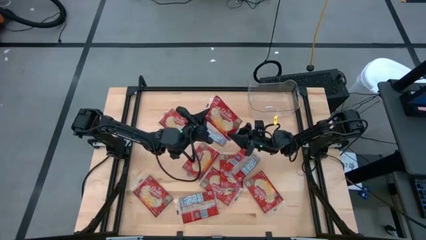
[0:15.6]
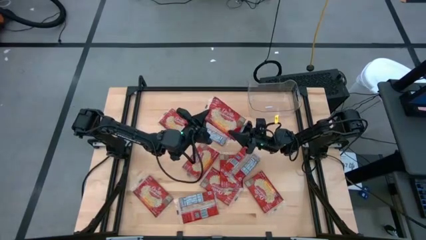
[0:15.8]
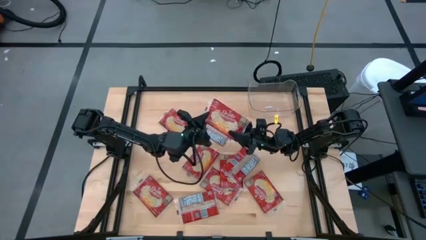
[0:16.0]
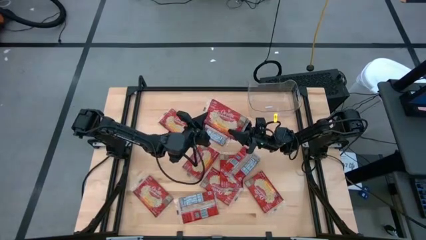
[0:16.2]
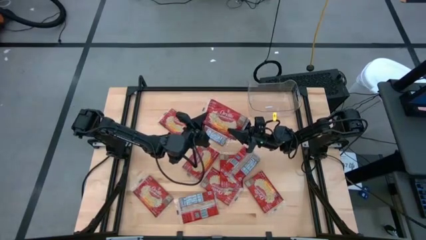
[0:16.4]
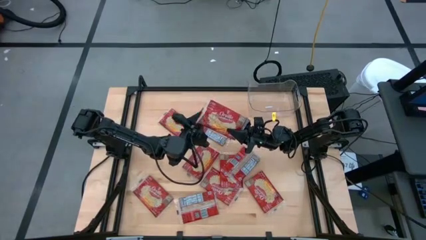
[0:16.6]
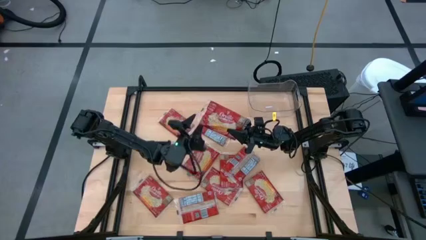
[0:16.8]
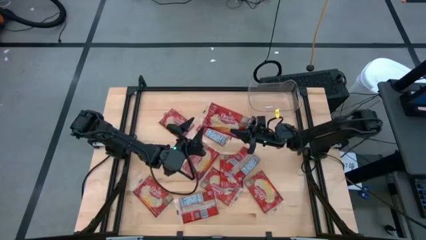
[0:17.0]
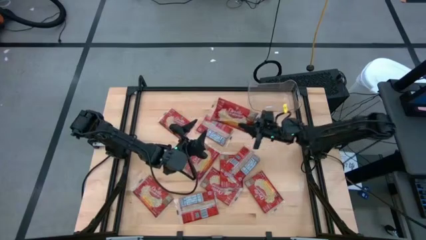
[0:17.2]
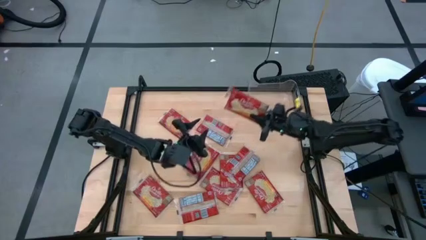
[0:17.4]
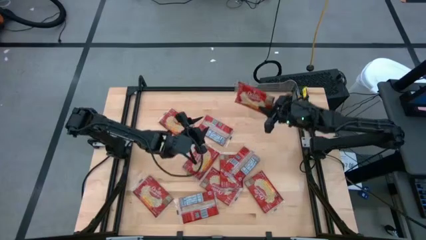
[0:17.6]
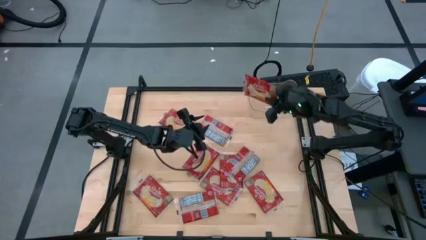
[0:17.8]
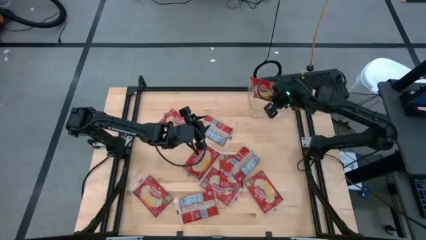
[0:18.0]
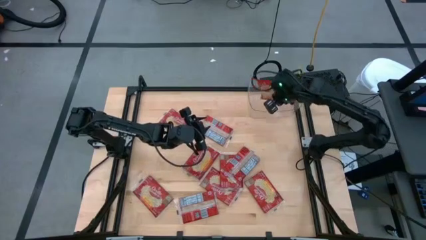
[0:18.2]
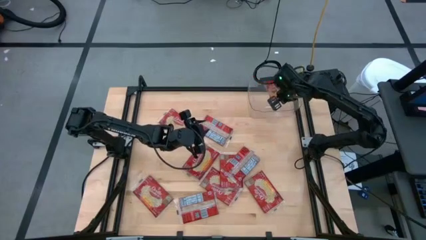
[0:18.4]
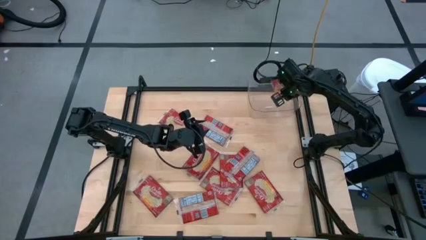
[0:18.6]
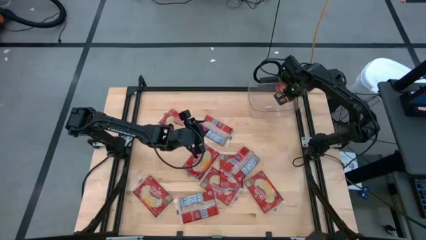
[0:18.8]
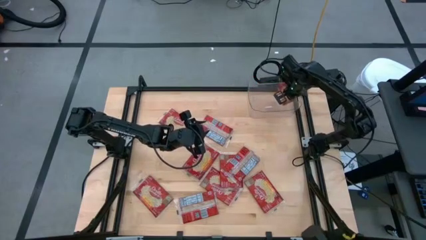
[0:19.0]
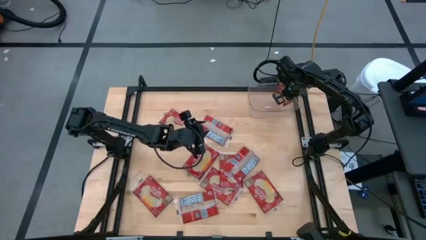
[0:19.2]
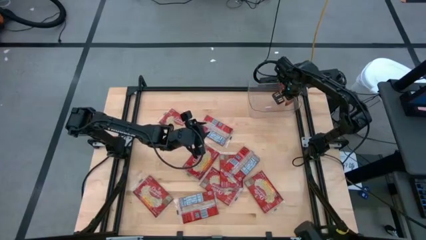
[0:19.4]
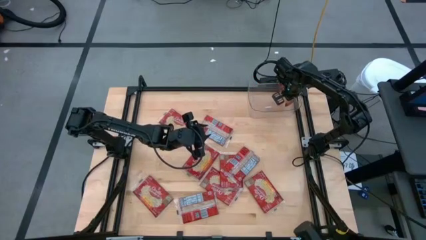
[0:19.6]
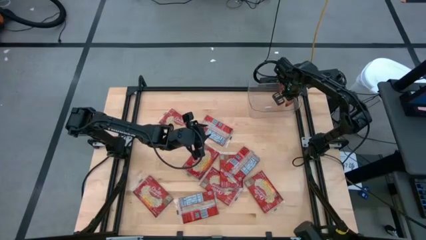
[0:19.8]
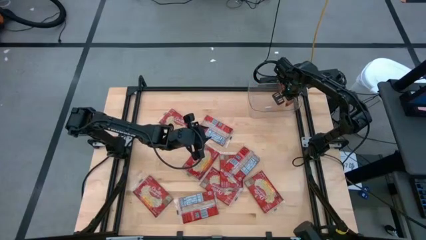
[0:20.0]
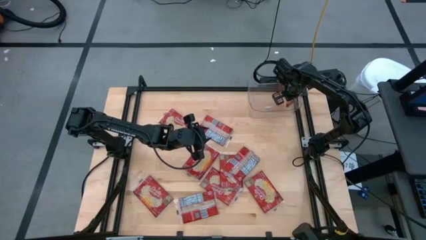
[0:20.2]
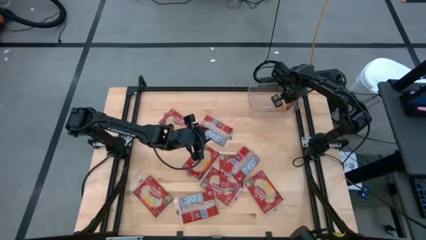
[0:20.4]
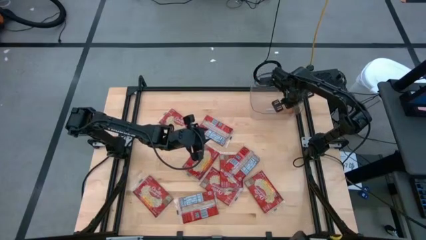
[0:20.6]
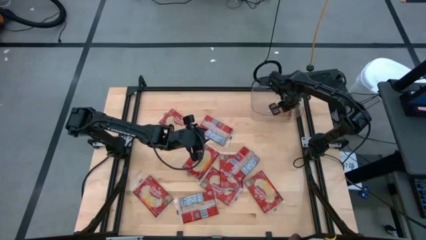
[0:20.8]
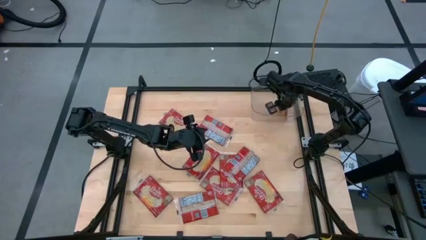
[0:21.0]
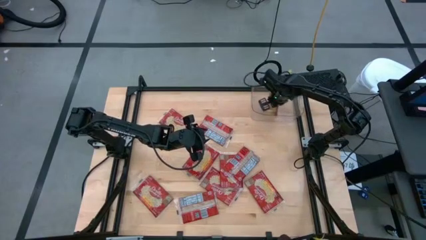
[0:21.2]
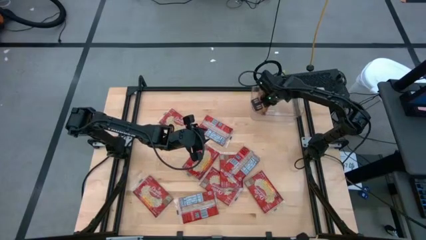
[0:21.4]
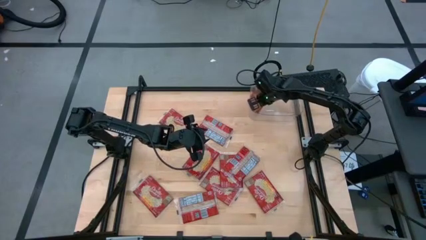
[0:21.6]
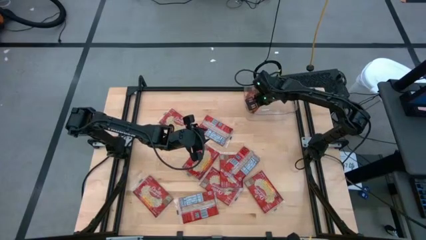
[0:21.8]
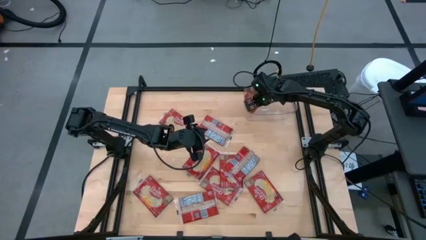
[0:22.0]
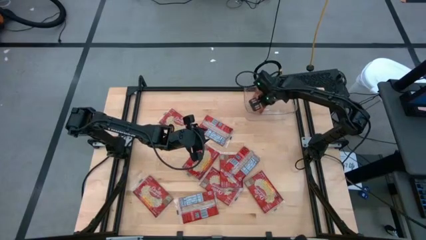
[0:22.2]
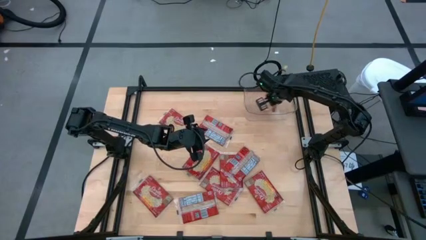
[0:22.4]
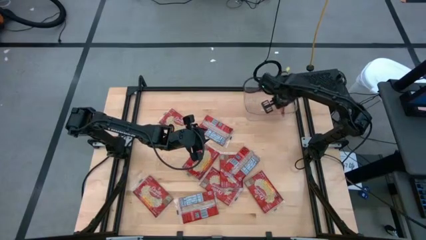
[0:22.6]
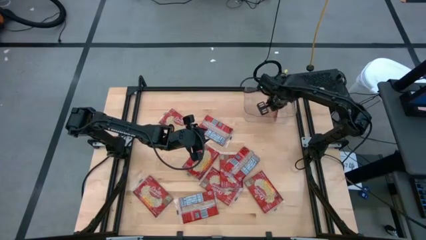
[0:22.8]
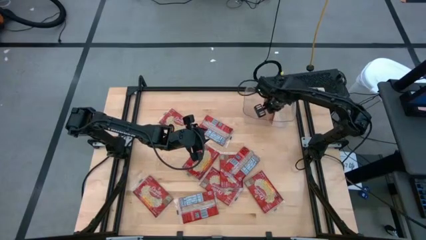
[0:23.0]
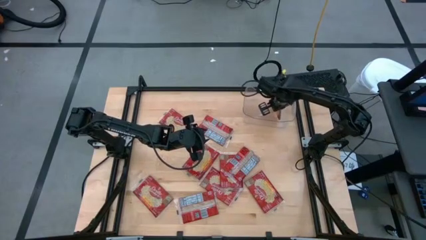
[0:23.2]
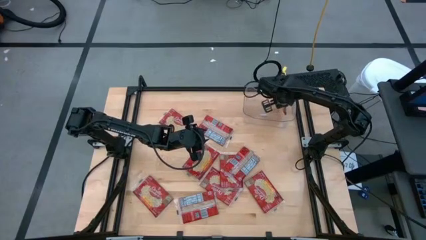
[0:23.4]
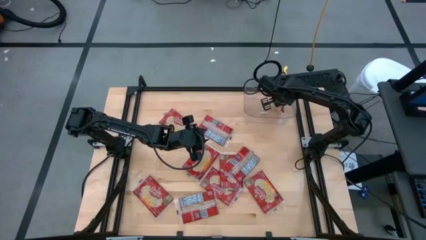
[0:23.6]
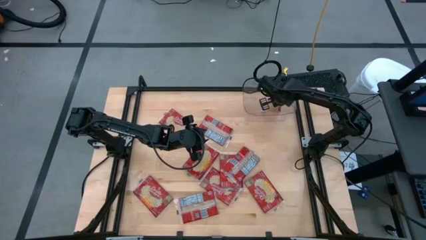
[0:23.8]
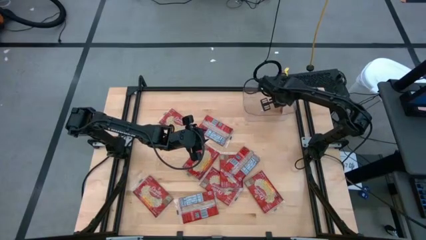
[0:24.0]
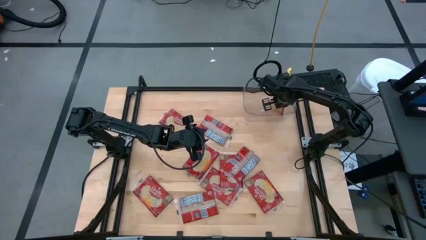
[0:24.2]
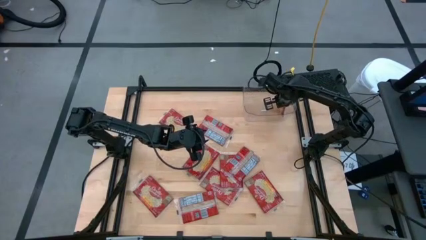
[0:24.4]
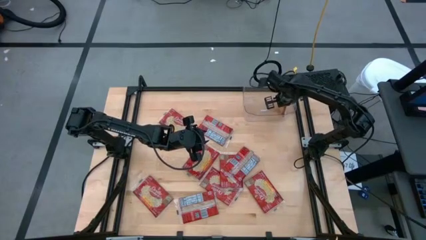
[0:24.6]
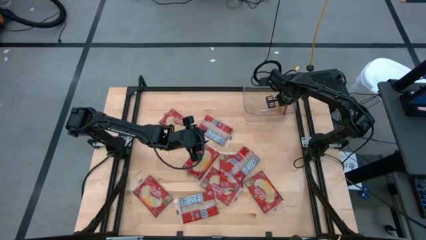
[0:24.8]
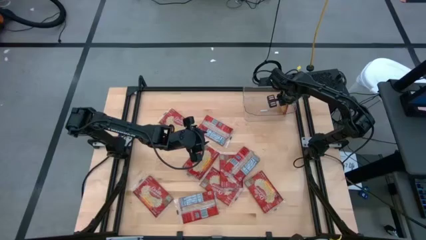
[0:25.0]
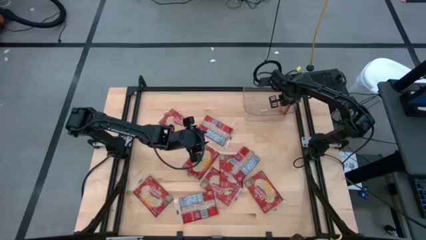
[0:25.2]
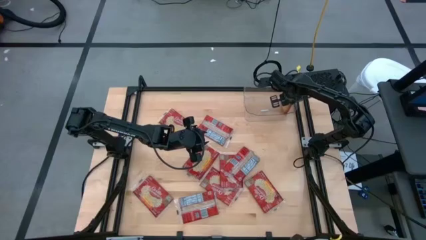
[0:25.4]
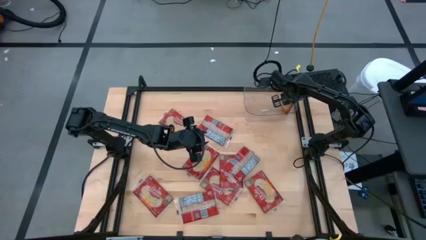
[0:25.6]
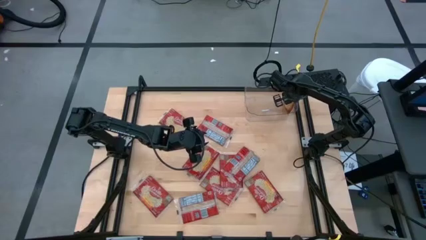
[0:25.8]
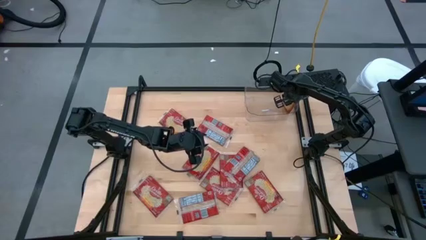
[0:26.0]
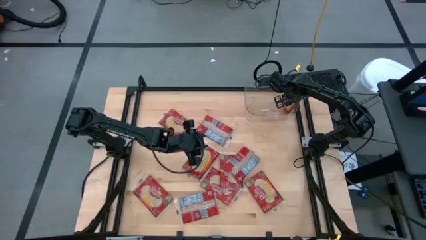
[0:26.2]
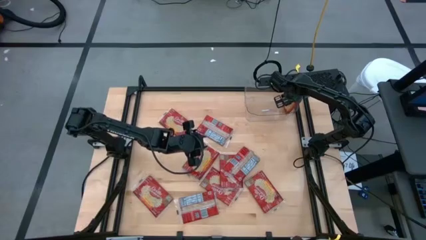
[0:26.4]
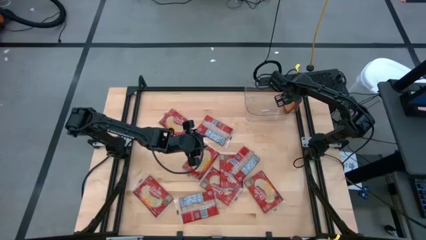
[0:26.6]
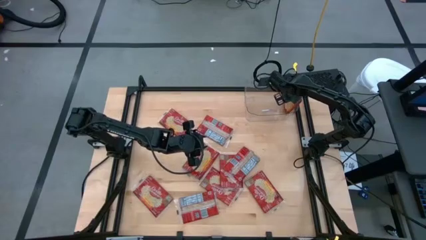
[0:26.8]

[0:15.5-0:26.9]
Task: Sort popcorn bags into baskets
Put the red popcorn bag into the transparent bin

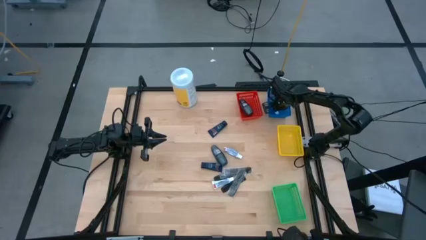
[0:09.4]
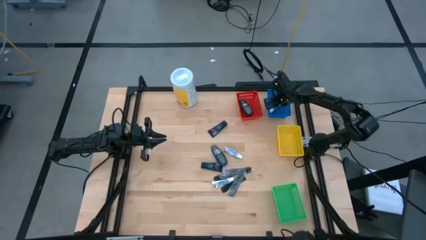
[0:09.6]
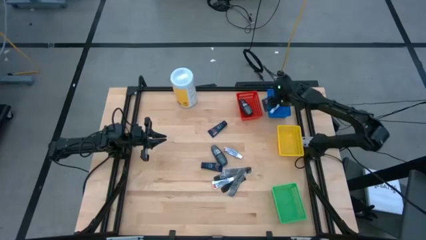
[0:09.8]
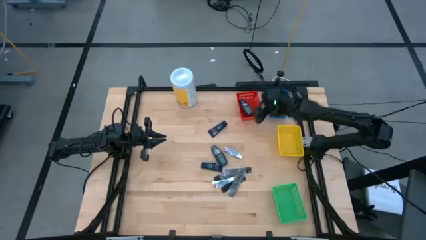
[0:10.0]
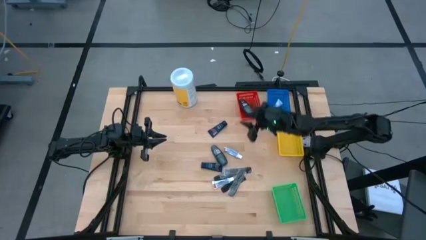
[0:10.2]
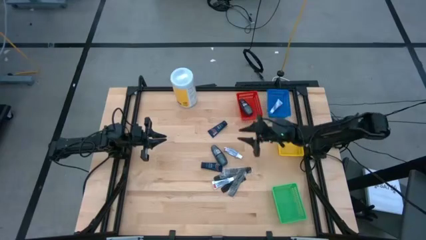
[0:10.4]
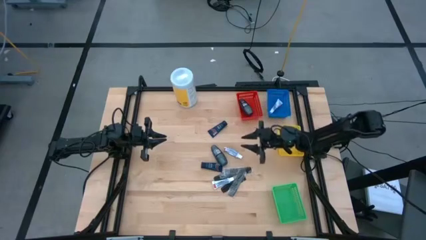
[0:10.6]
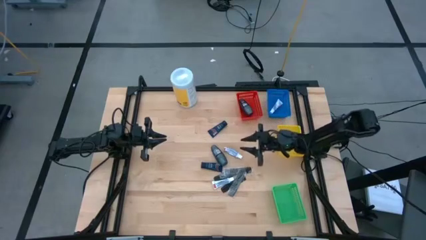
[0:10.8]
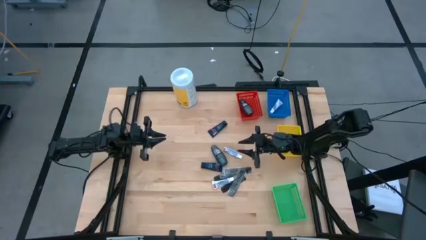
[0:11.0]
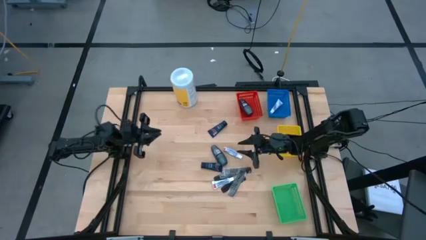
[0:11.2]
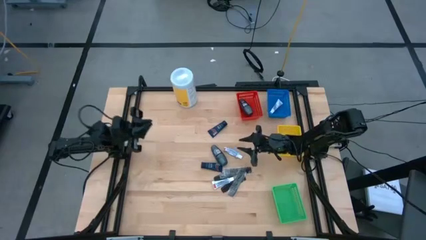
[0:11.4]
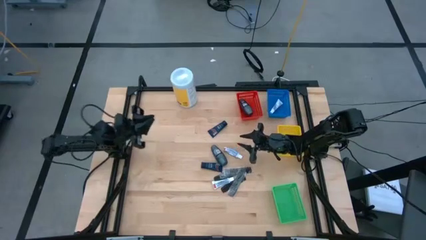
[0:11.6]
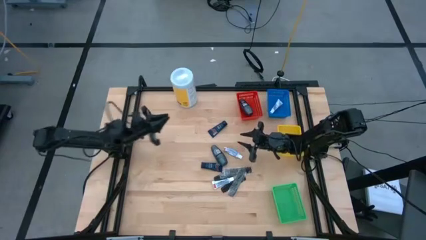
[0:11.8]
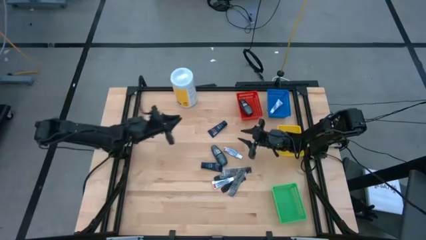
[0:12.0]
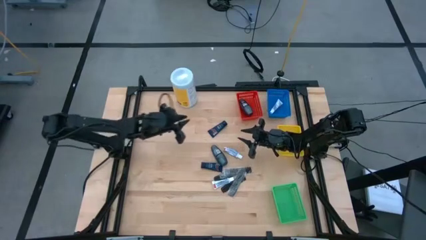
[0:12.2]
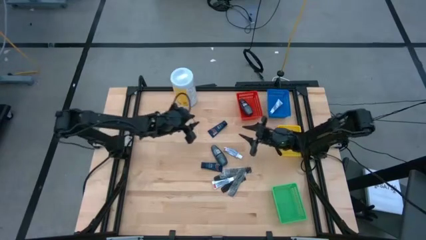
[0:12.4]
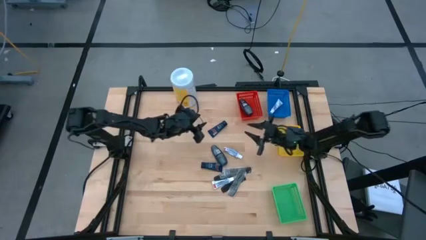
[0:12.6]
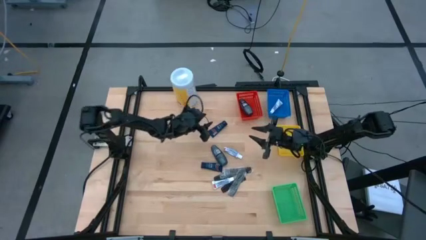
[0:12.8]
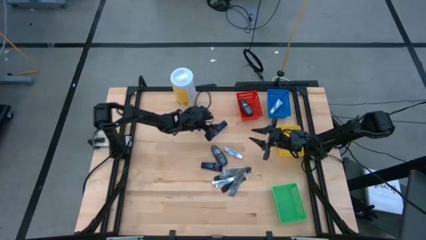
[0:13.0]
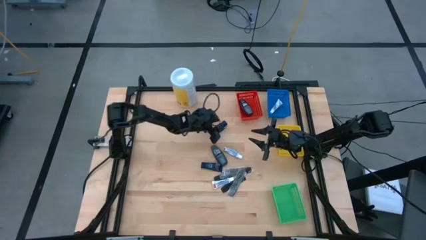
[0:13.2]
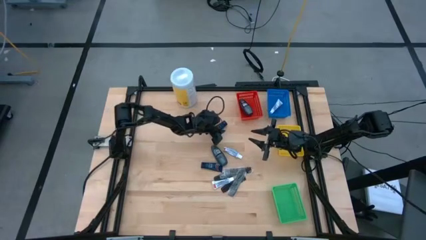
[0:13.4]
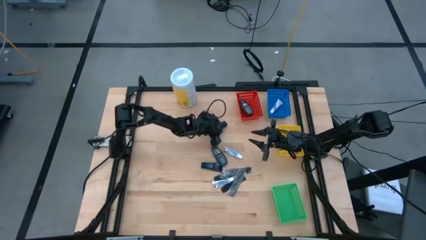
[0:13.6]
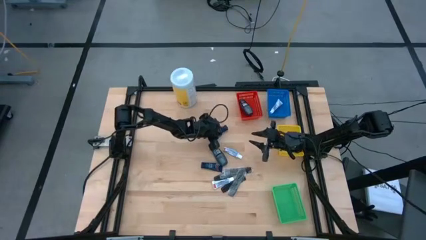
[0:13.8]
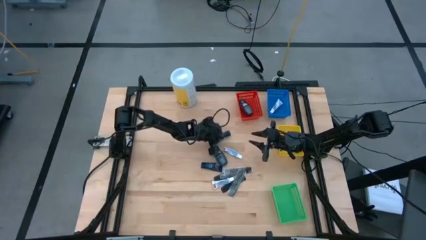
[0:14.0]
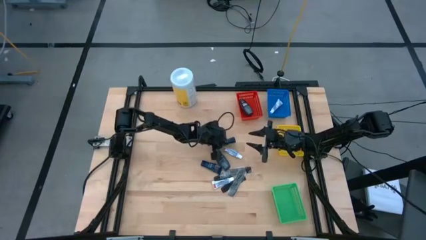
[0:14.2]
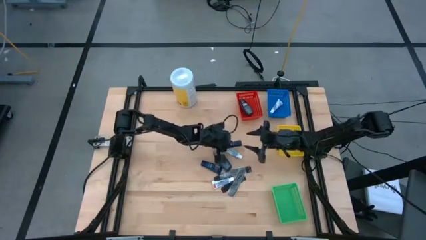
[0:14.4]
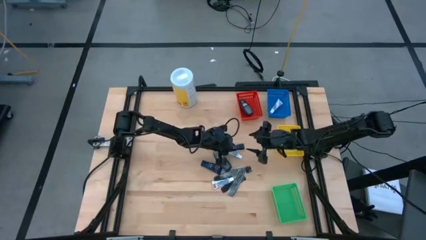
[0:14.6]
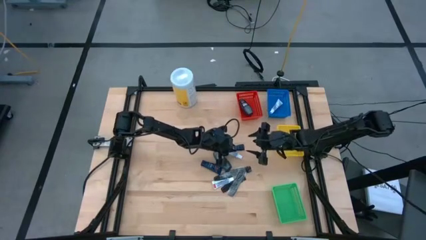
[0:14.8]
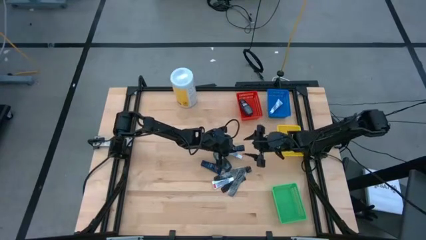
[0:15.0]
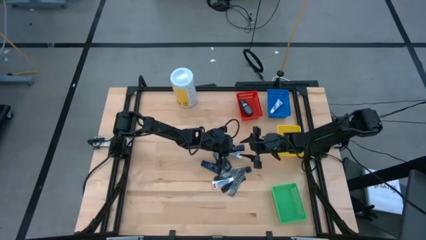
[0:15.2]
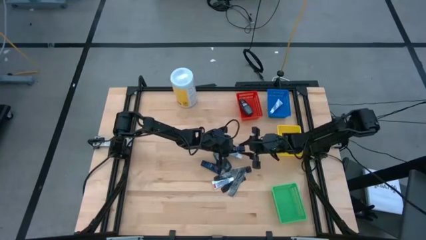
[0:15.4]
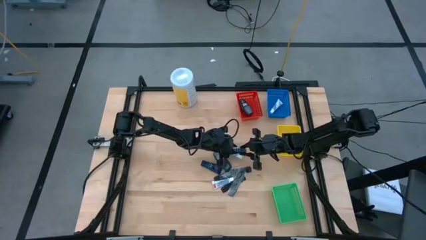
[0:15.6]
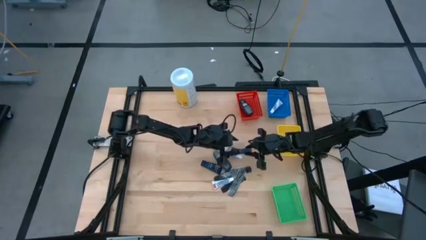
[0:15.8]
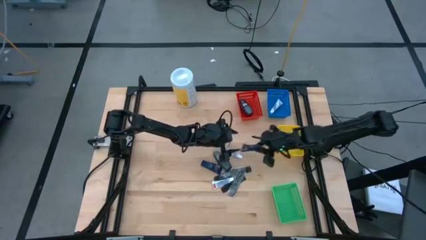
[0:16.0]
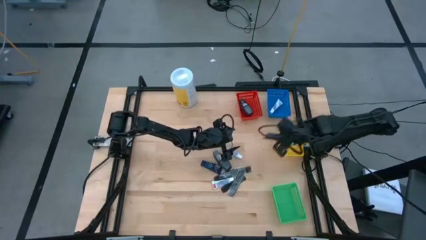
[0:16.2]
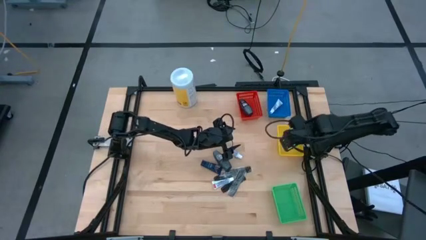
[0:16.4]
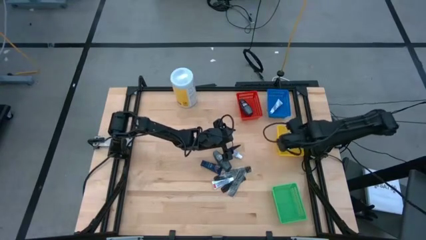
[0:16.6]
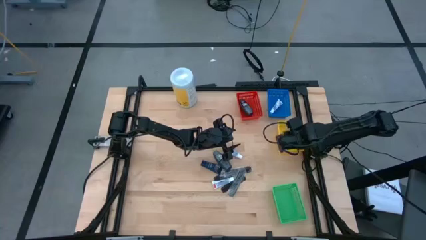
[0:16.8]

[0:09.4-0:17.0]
Task: Pick & Place Travel size toiletries
Put the black shaving cream into the yellow bin
